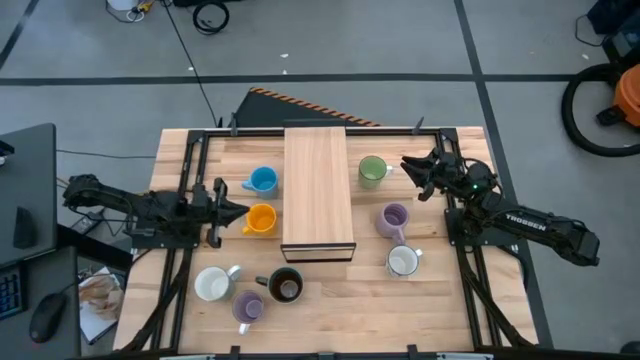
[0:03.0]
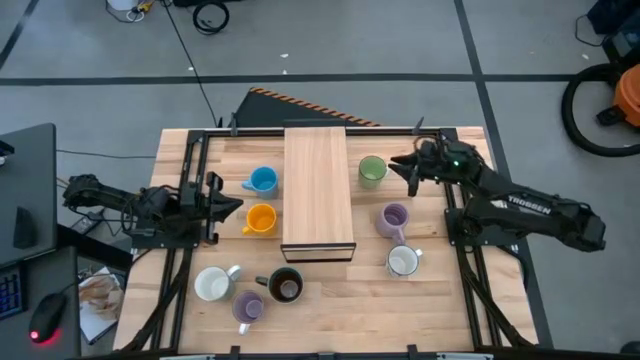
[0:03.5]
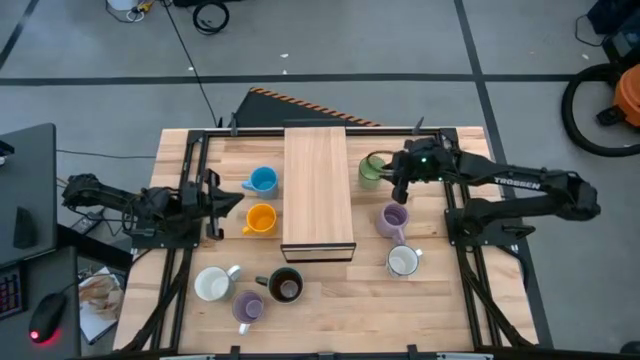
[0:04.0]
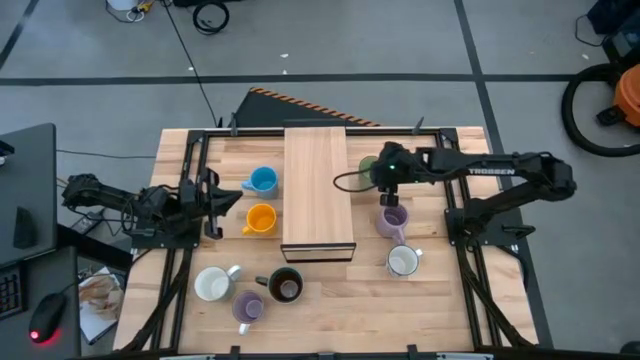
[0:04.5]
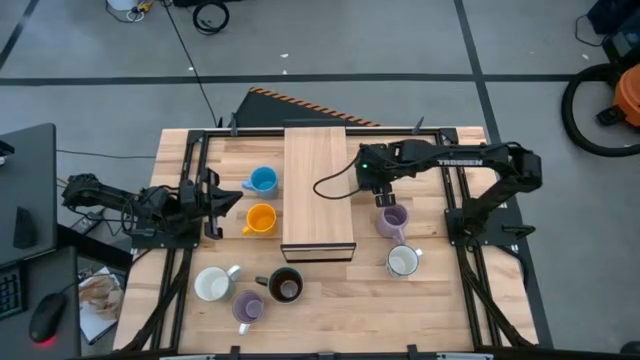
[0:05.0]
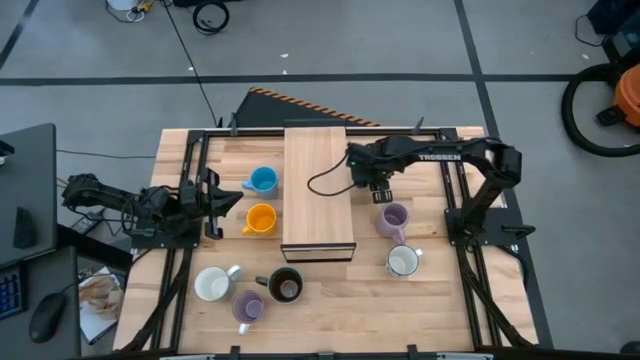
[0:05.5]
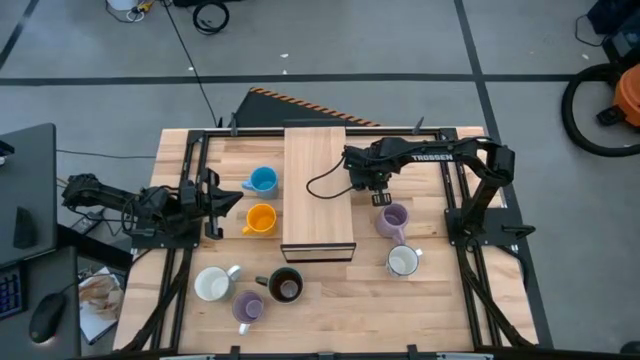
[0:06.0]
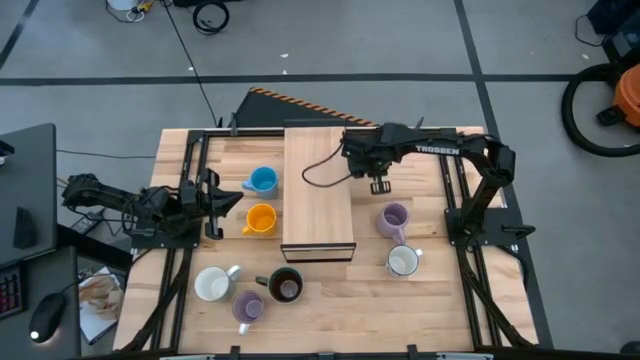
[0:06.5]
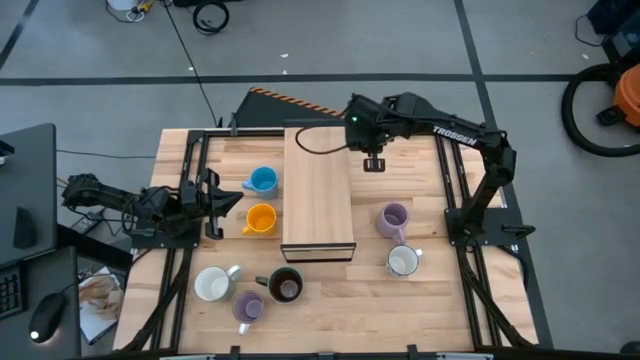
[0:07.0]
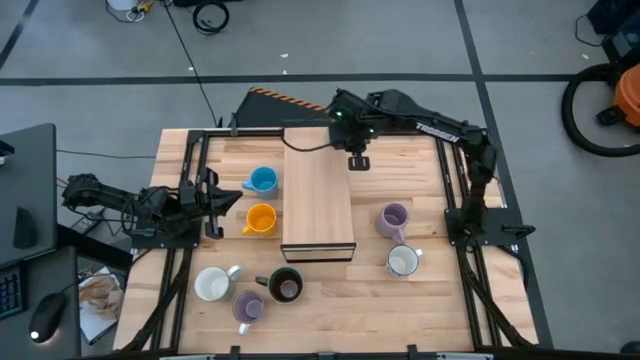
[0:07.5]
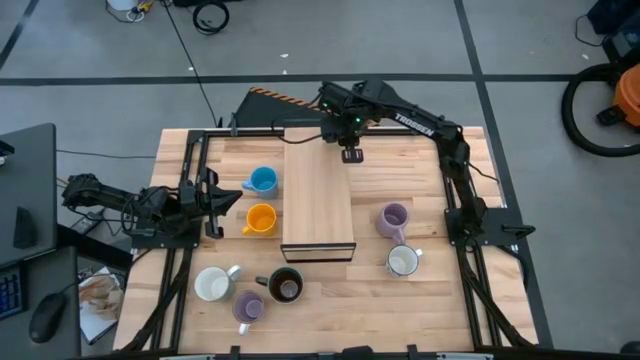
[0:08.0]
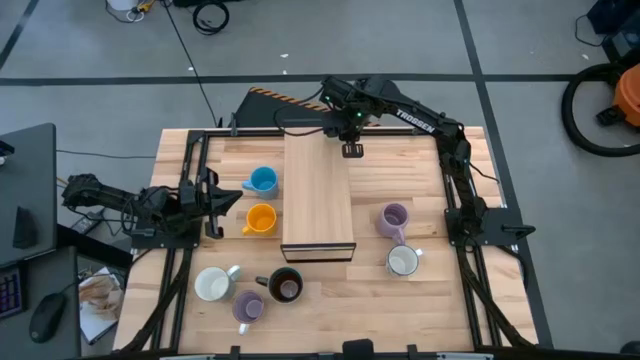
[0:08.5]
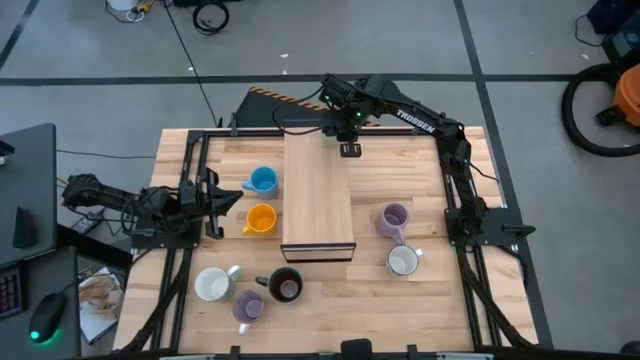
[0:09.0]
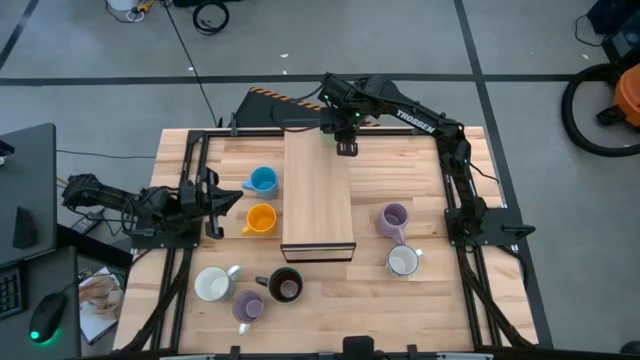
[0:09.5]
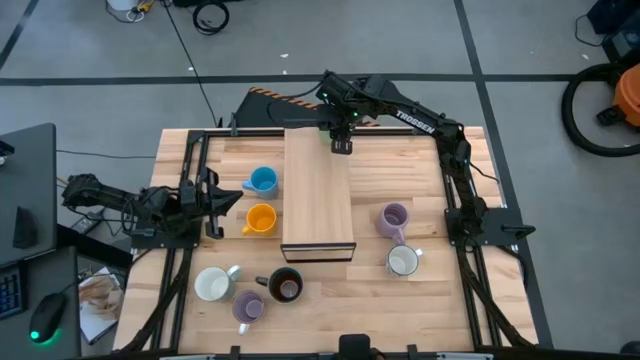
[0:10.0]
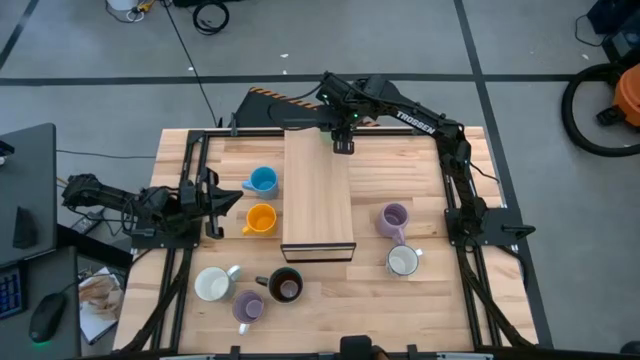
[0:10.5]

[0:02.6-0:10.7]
Task: Place coffee mugs
Put the green mug on the shelf

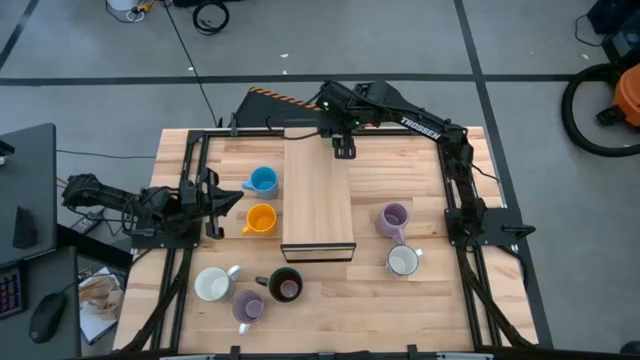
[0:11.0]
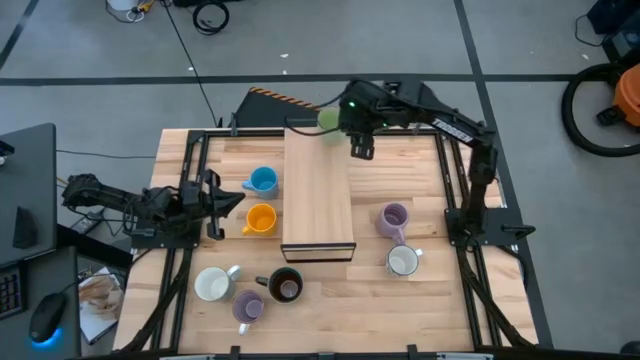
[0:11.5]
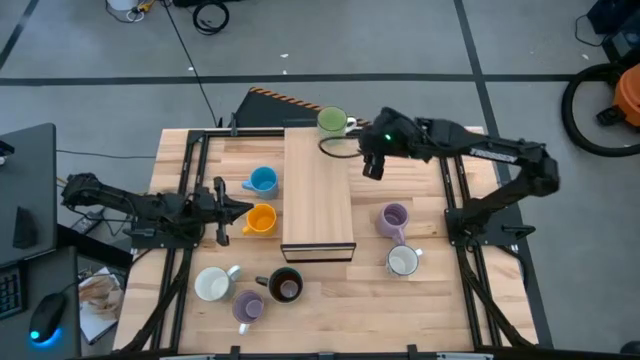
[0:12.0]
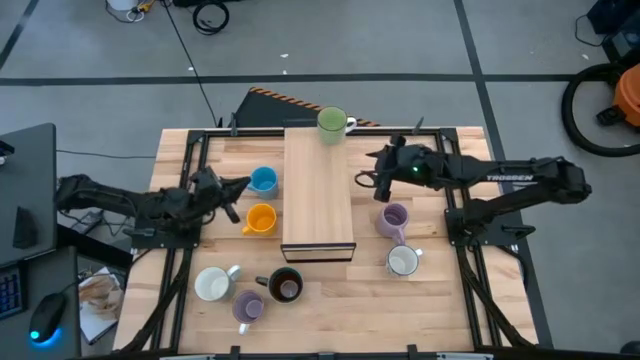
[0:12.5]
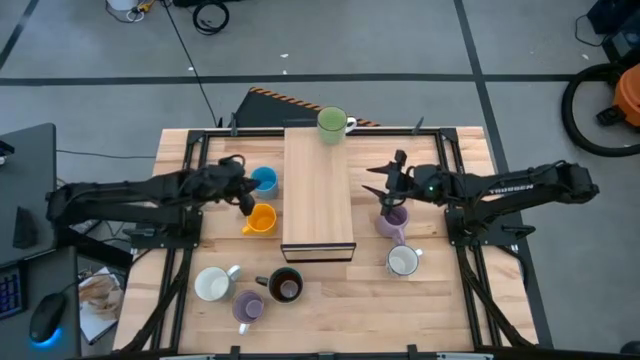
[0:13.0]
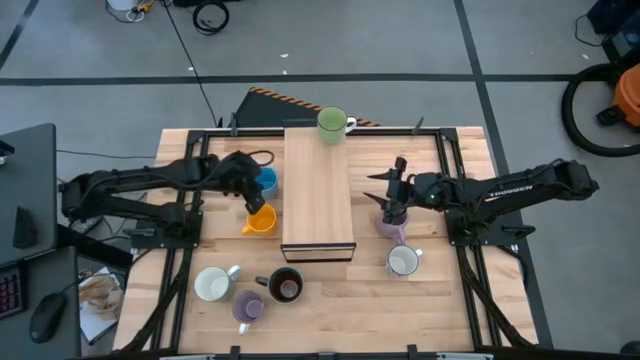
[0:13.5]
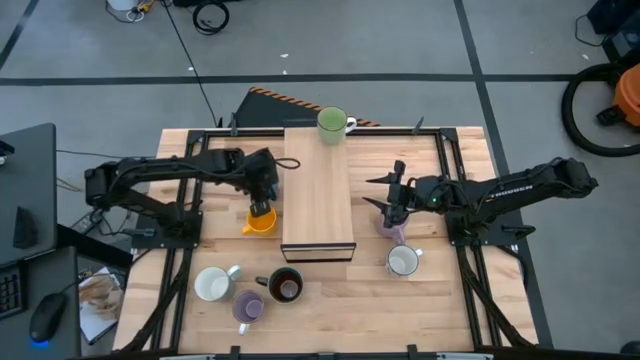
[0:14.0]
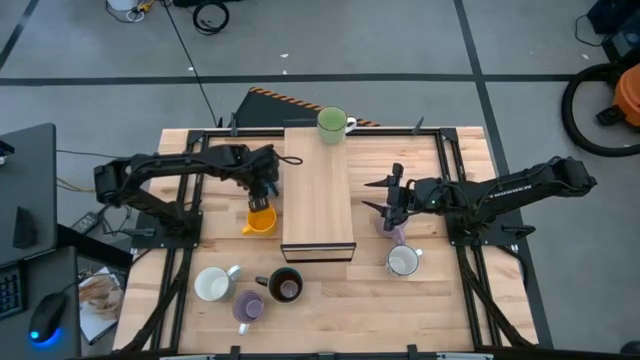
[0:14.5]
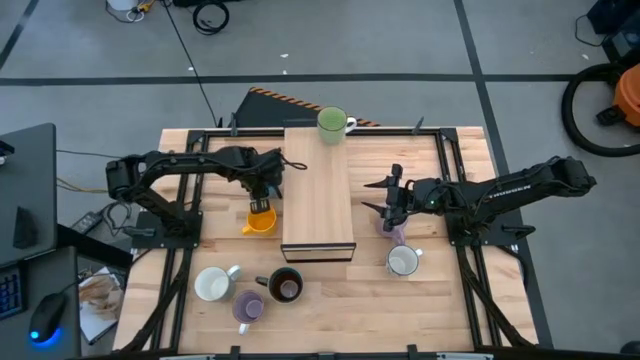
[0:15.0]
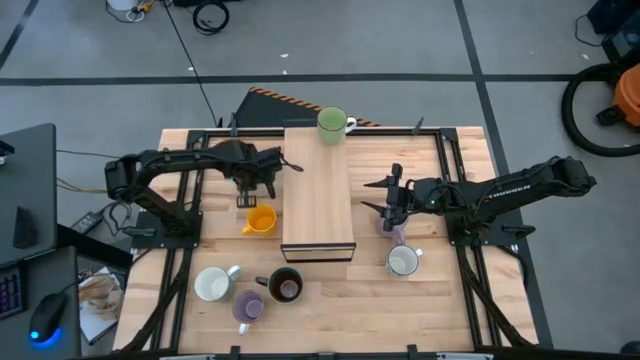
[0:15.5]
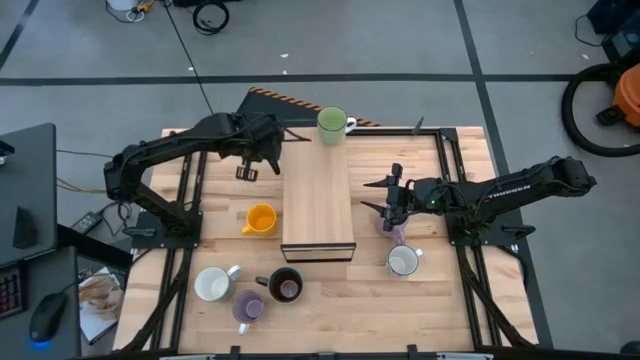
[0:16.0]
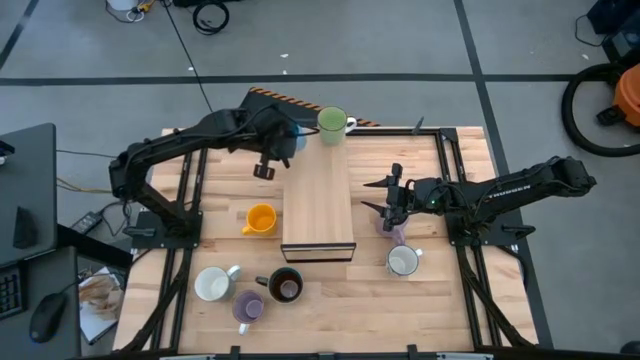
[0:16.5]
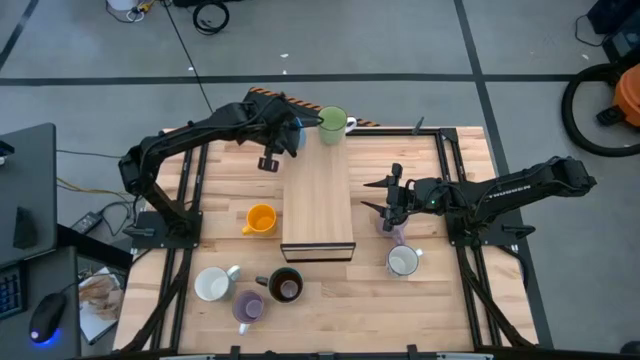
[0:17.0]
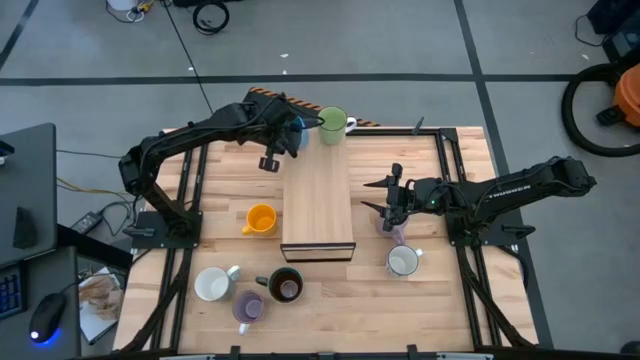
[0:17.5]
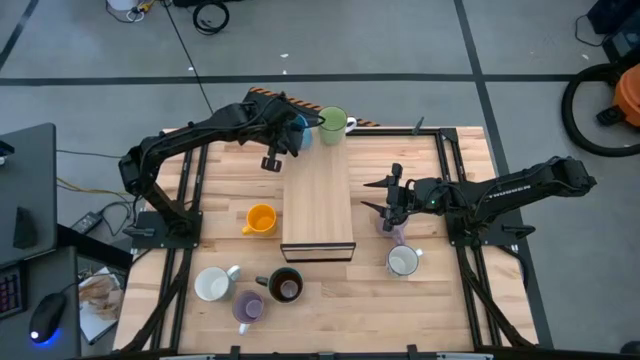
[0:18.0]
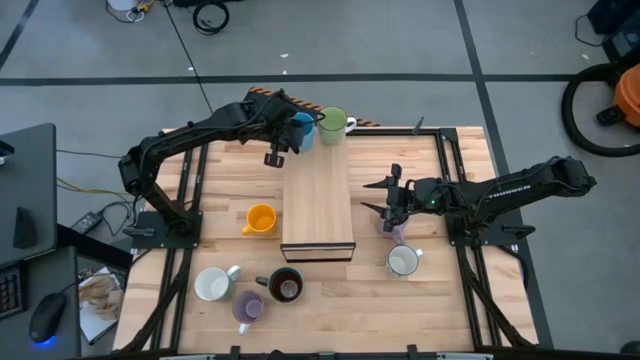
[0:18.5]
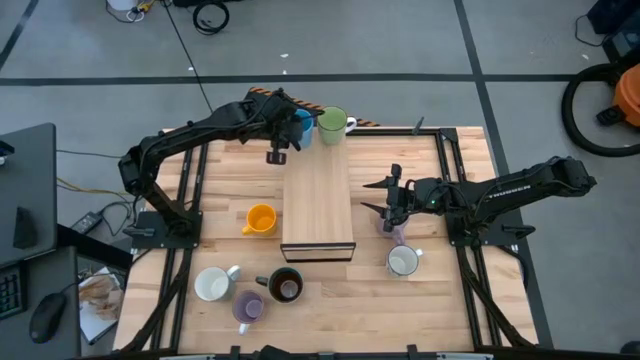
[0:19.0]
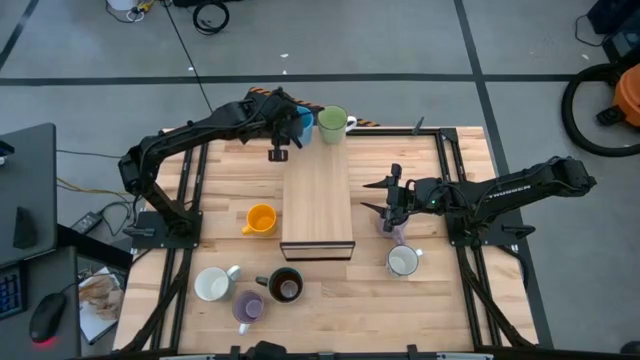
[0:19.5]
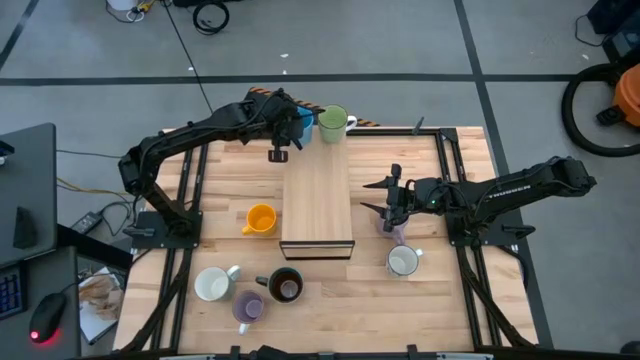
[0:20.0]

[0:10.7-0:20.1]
Put the blue mug on the shelf

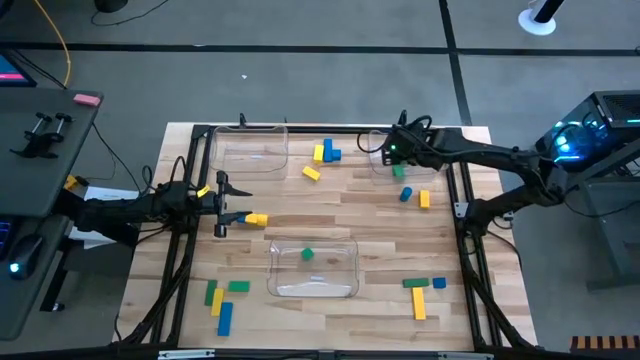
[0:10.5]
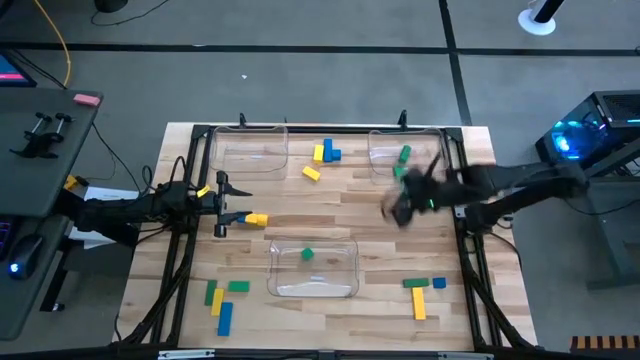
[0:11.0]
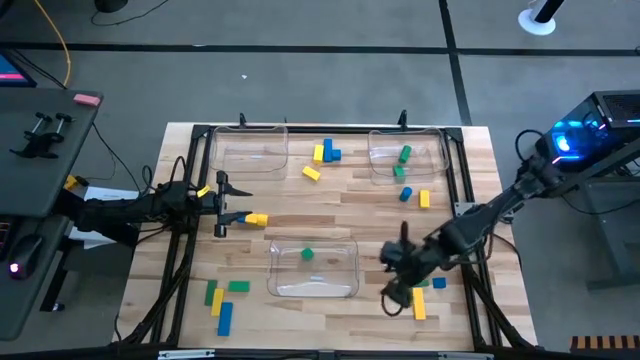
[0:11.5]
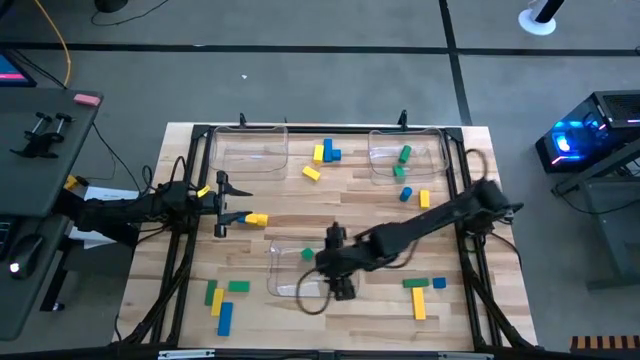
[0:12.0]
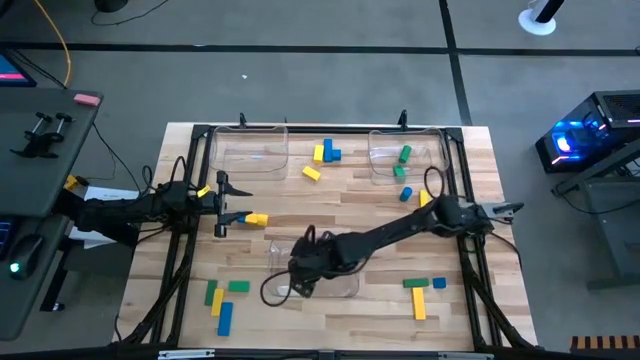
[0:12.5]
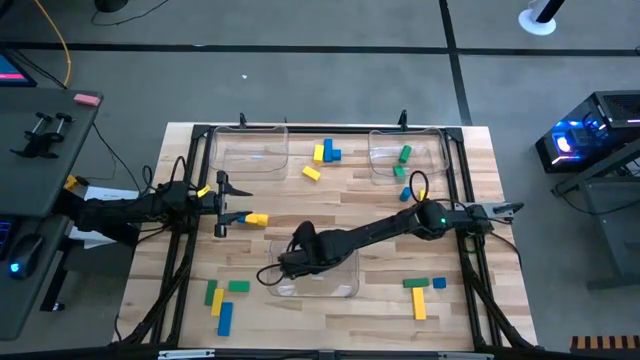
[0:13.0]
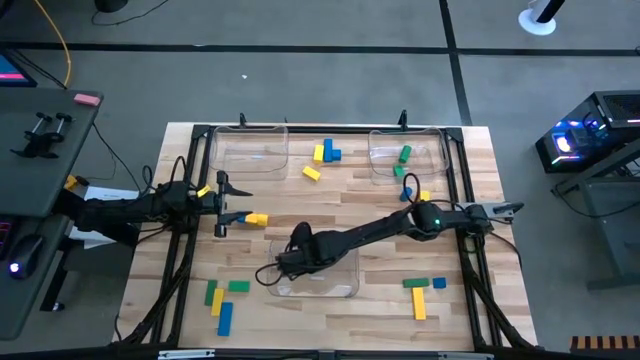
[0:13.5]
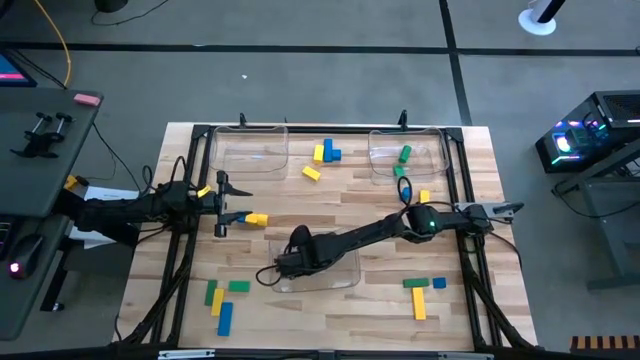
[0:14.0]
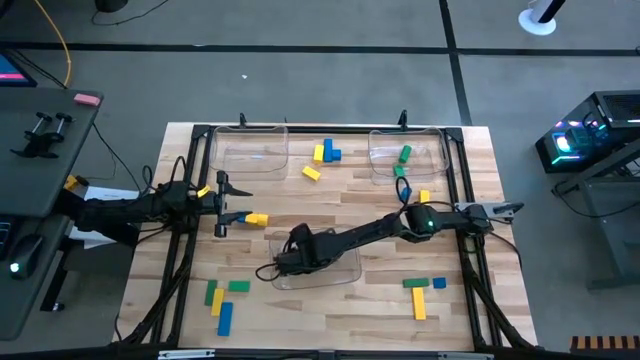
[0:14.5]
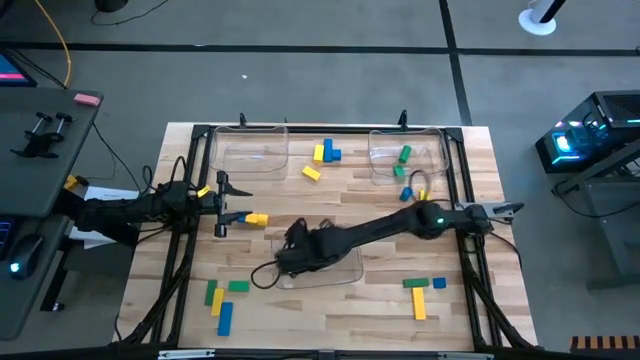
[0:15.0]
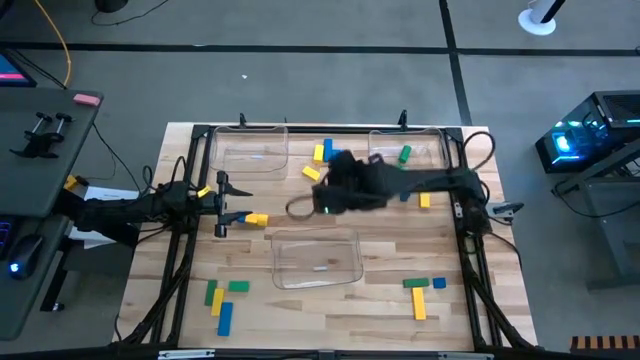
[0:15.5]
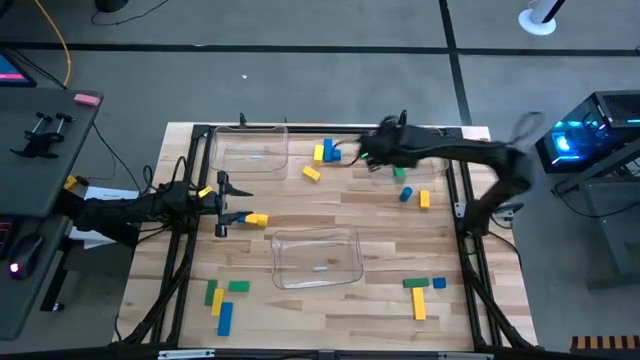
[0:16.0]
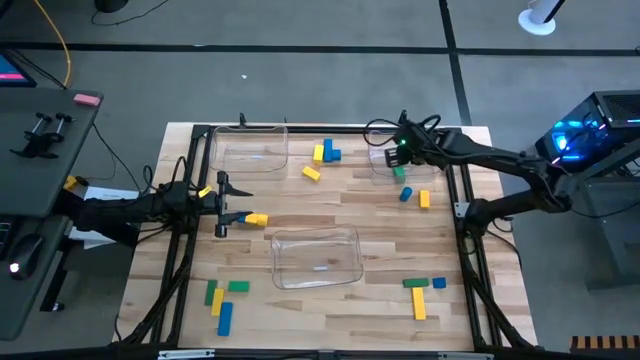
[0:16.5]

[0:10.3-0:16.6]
Task: Sort blocks
Put the green block into the top right transparent bin
